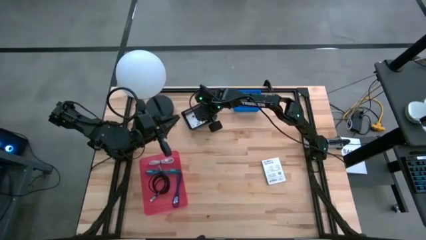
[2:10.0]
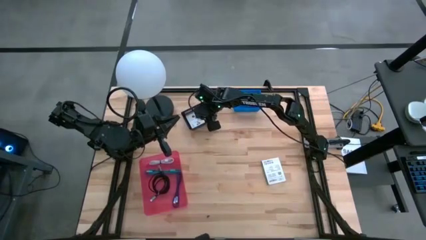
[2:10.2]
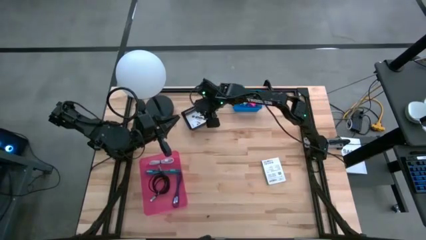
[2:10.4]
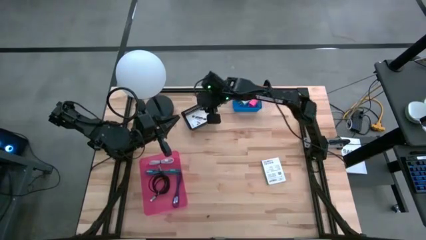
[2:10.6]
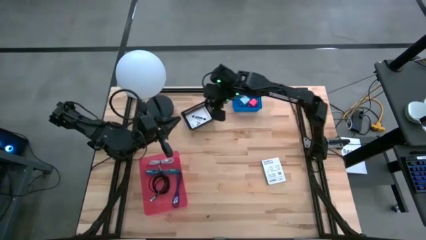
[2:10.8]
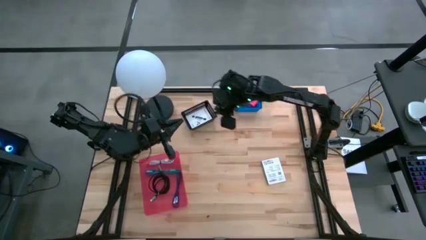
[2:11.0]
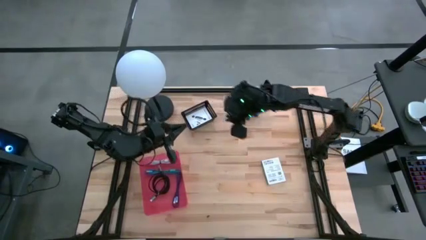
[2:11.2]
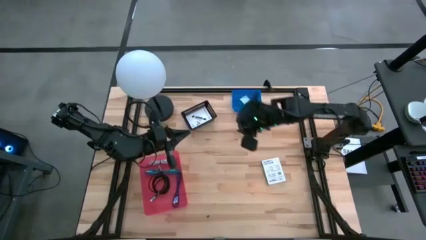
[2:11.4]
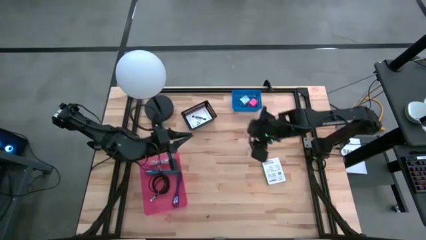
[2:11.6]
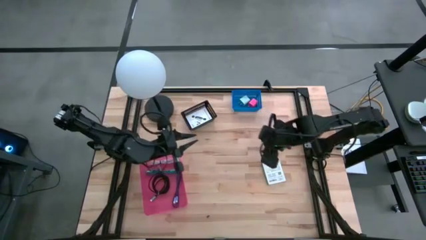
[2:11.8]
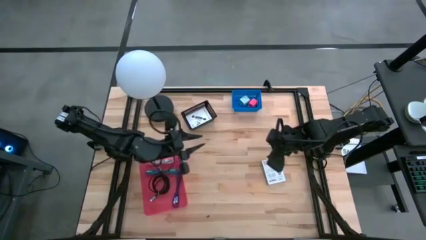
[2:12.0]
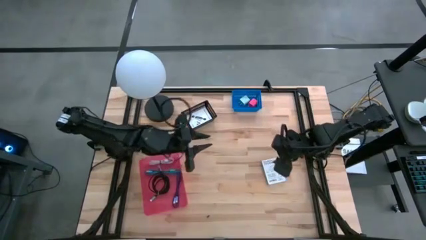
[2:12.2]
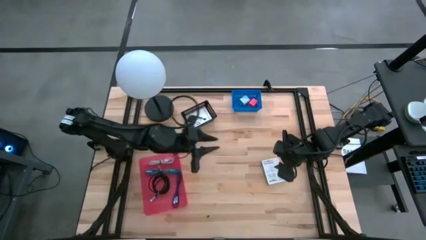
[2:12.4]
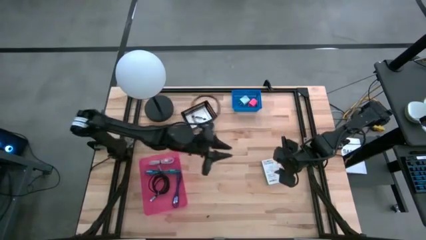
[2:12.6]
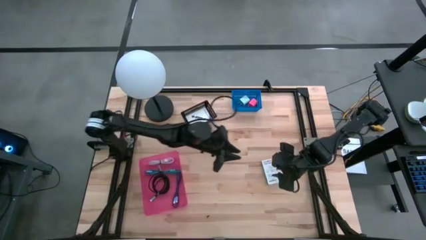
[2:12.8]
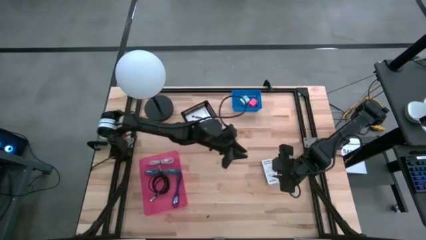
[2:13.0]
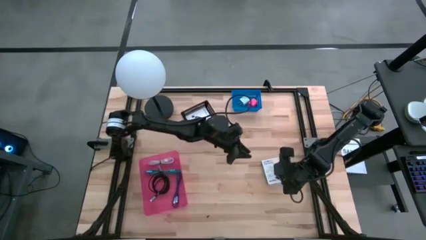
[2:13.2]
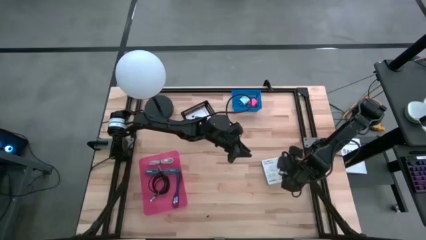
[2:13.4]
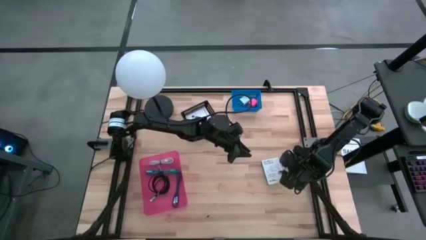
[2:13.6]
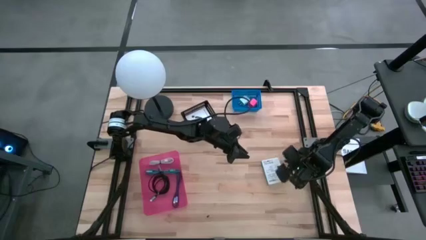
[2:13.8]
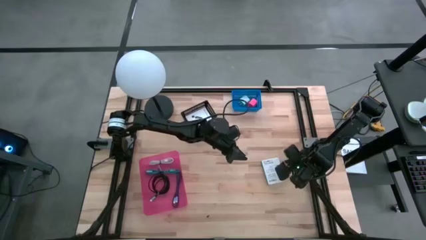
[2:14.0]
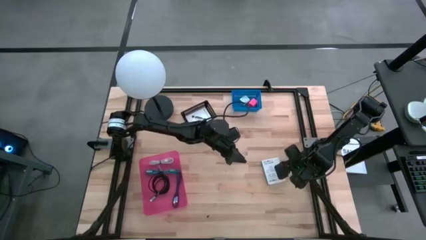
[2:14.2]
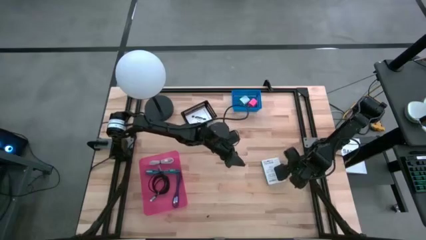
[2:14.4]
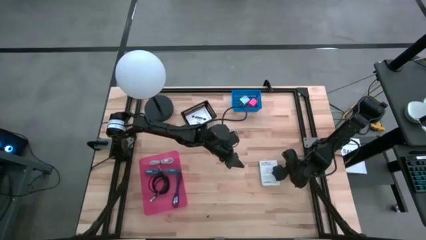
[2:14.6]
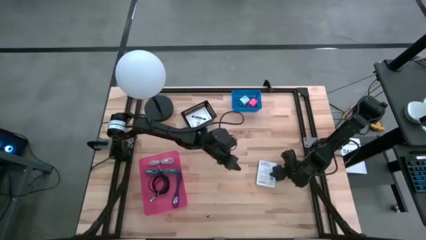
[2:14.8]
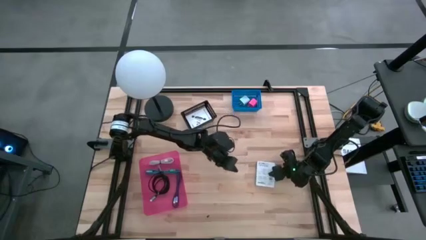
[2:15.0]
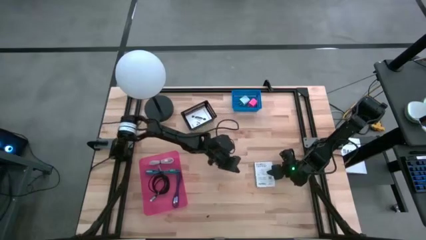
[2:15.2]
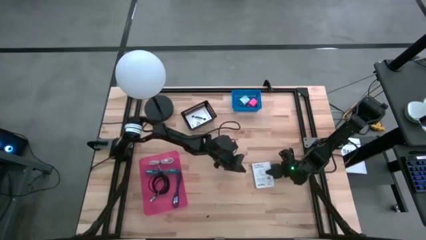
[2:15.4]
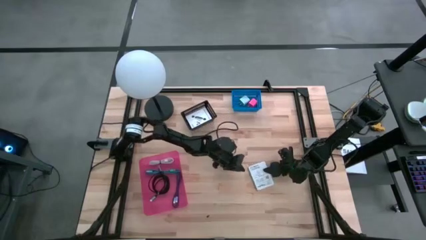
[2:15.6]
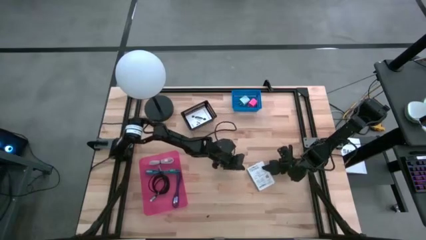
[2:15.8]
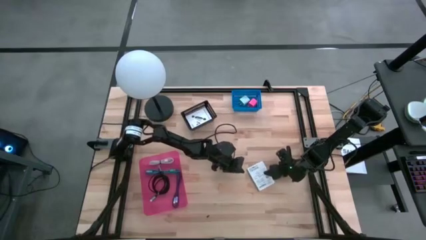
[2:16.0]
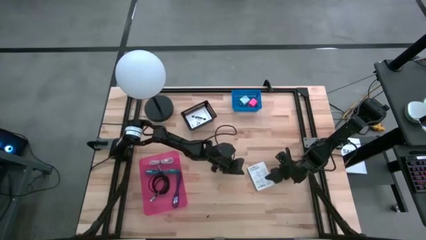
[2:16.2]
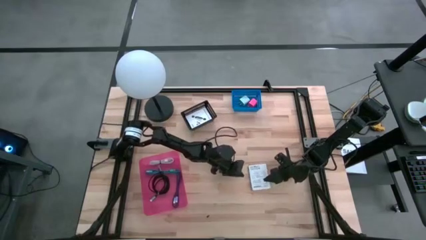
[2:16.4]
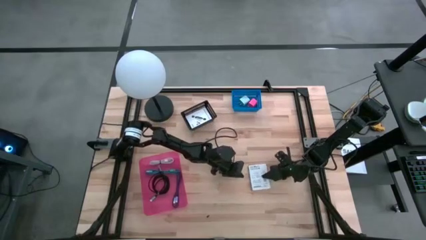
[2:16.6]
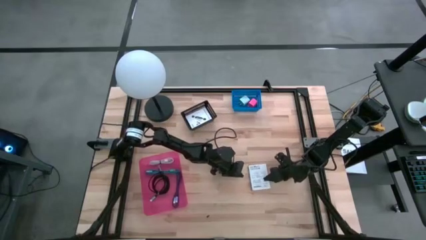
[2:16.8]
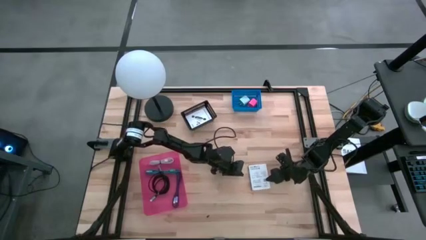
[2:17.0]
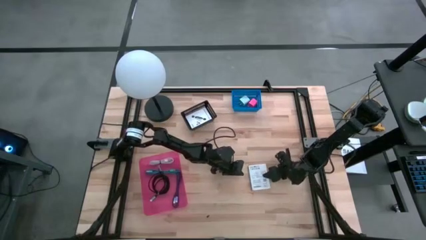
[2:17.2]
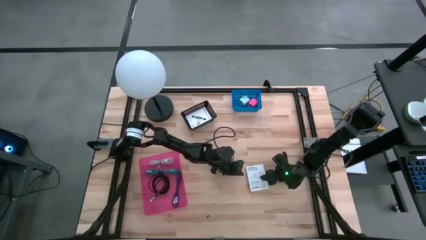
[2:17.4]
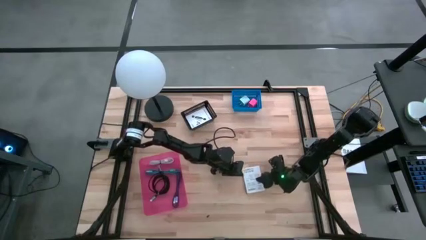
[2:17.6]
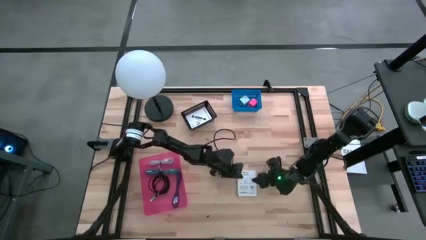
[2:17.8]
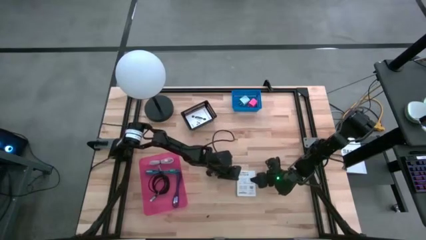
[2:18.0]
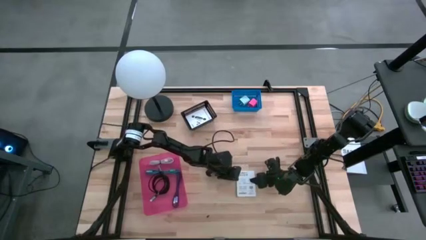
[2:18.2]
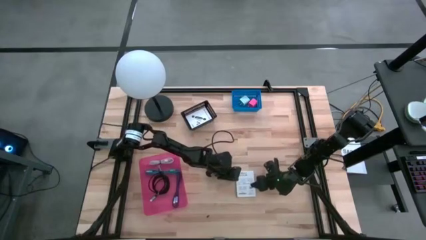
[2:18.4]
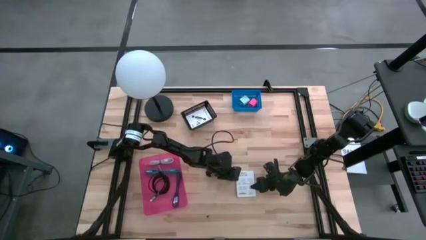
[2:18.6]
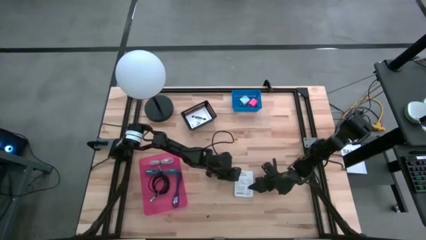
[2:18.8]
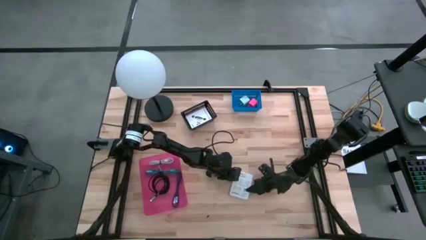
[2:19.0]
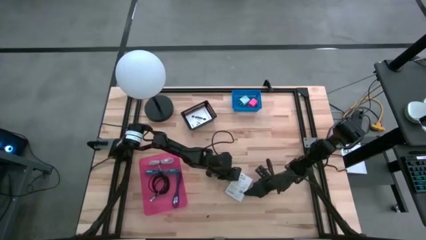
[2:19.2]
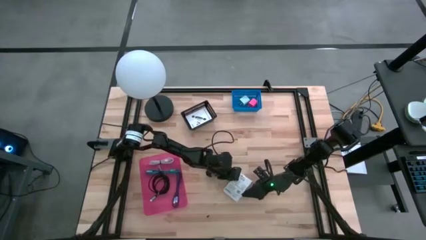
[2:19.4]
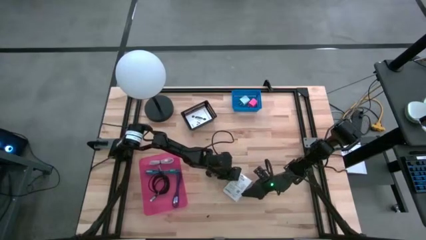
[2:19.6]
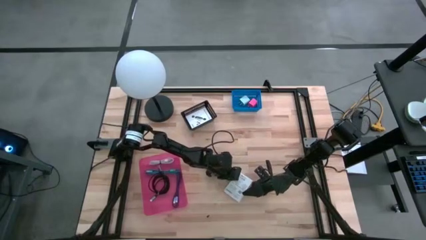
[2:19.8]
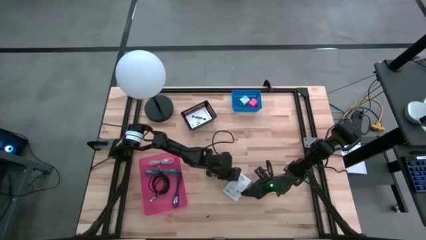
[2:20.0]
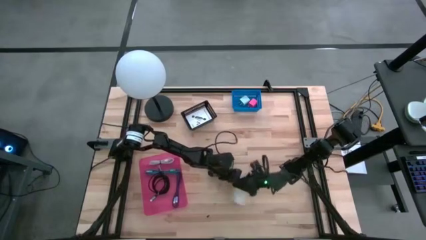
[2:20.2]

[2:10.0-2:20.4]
Task: Pick and place items into bin
Put the card reader box into the black bin
